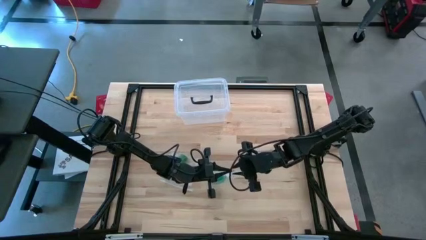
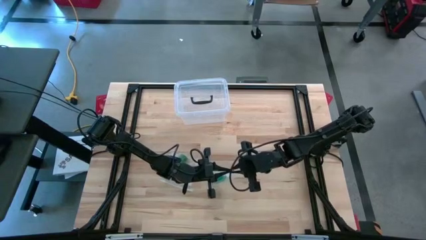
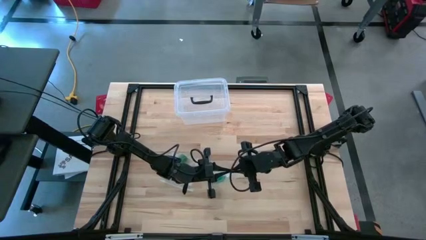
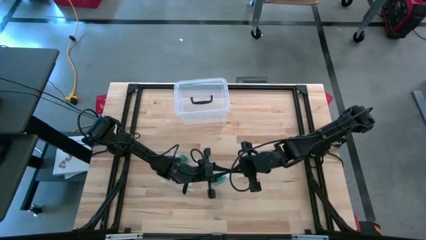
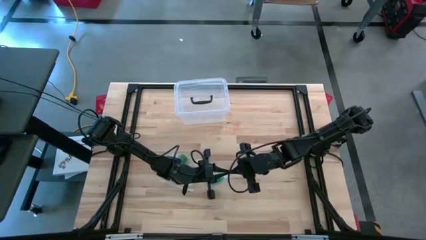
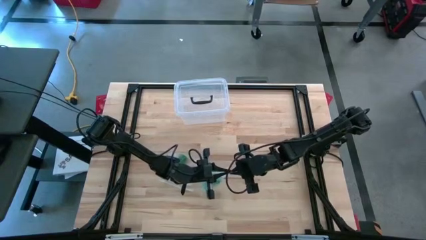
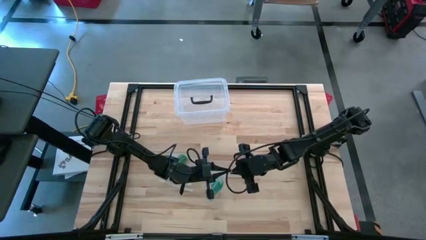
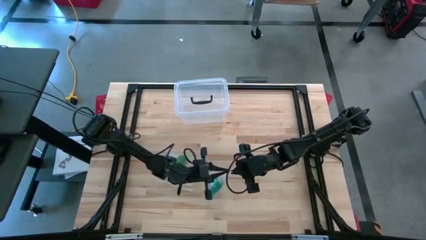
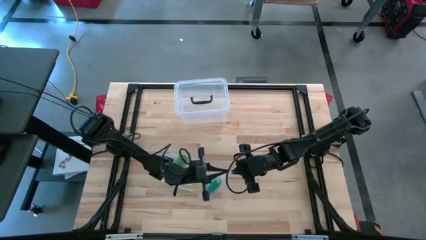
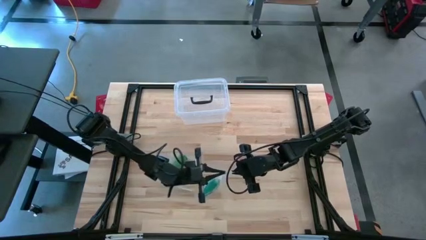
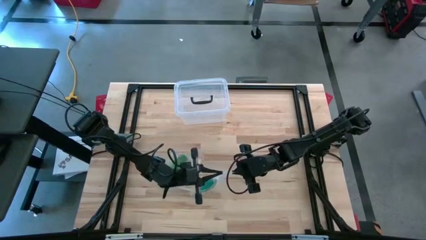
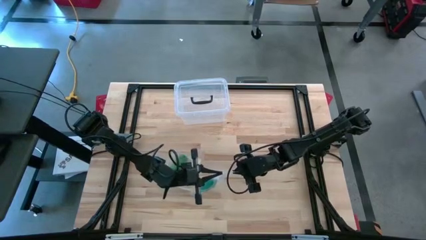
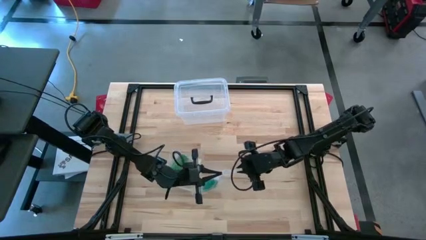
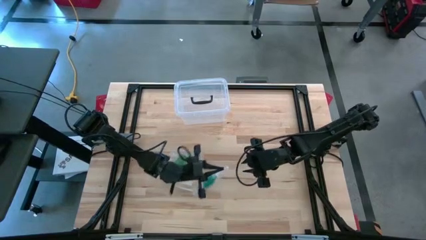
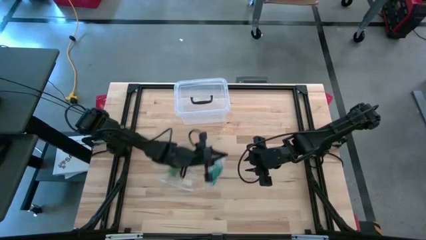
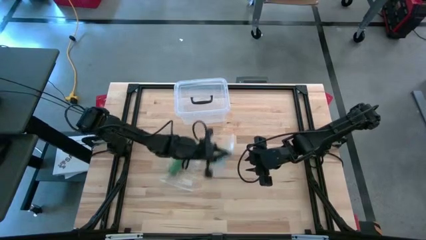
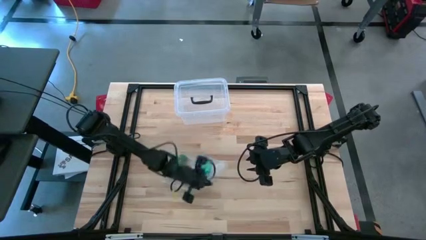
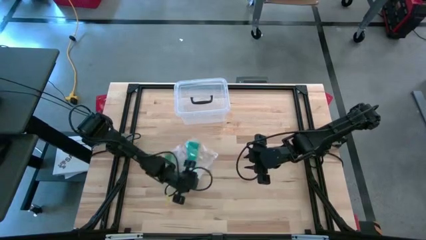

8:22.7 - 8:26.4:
Task: Roll bandage
Close the zip bag

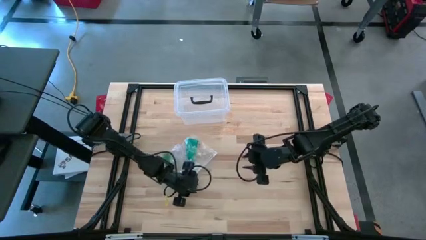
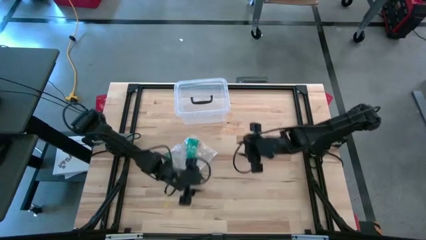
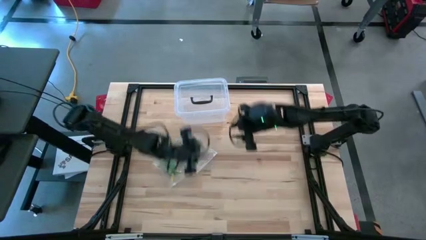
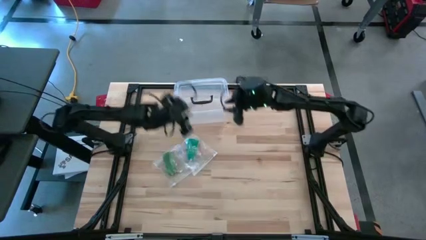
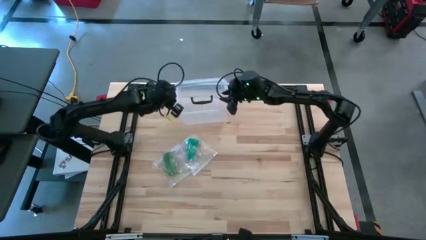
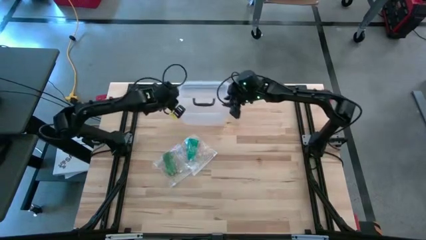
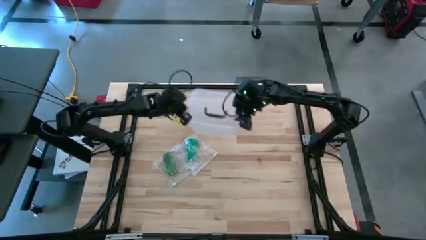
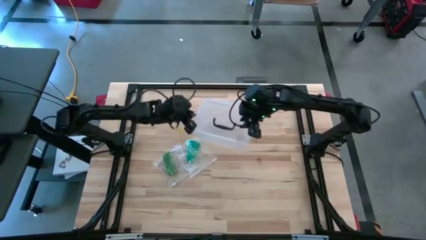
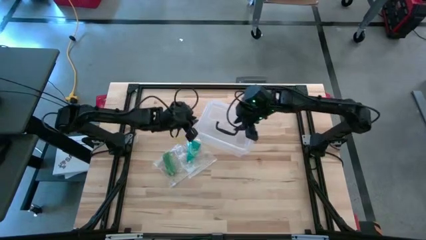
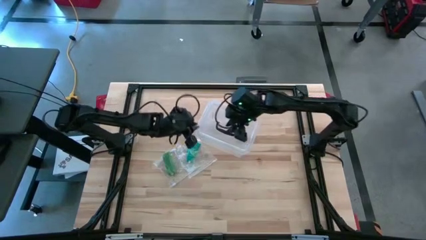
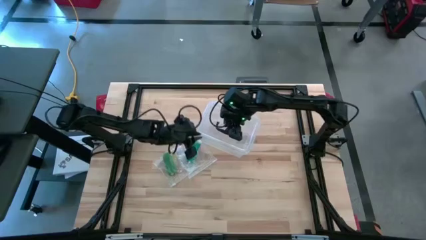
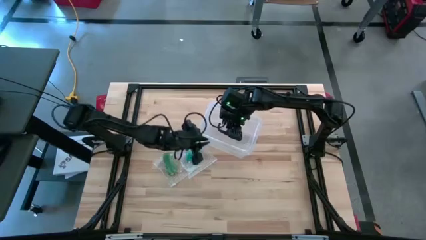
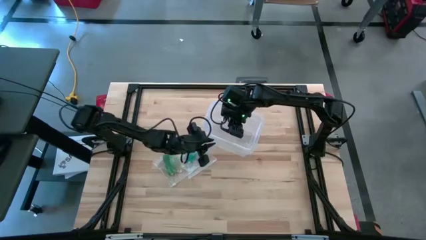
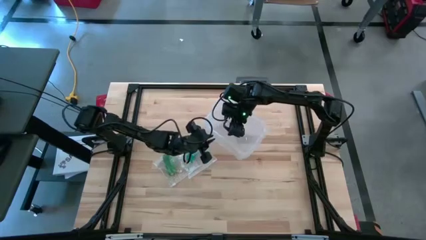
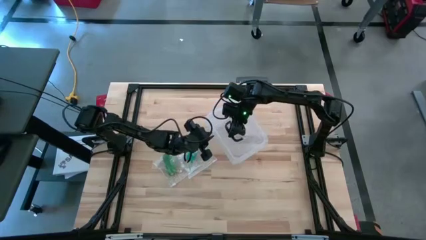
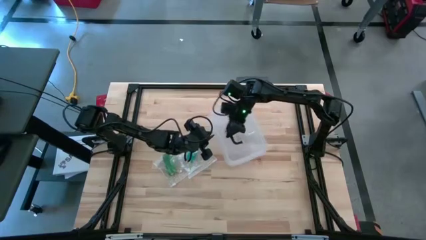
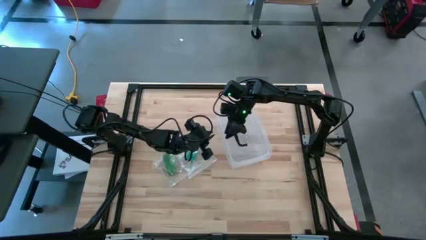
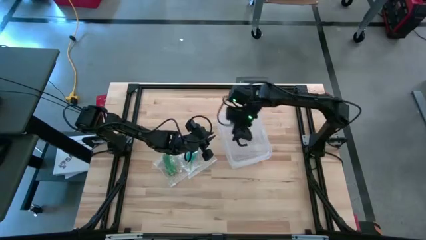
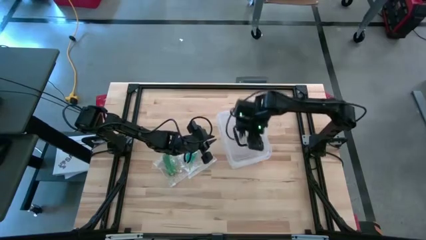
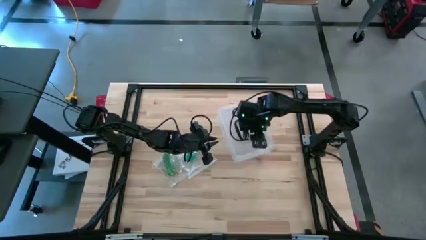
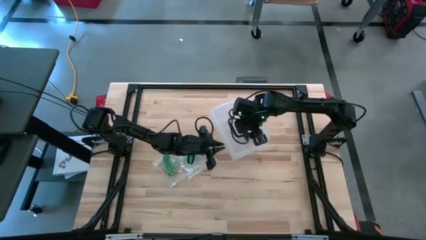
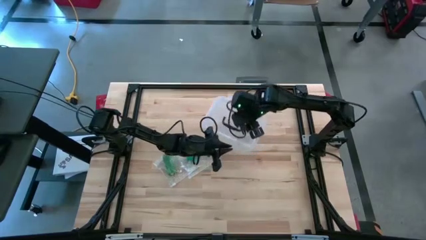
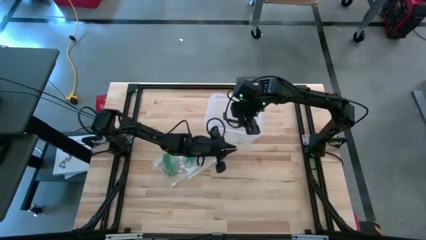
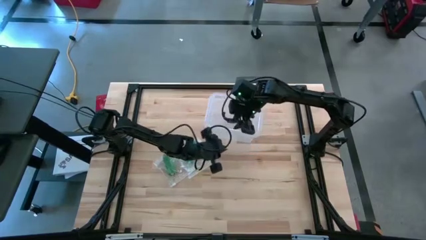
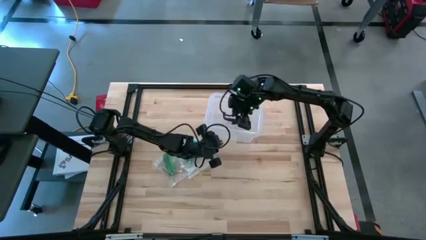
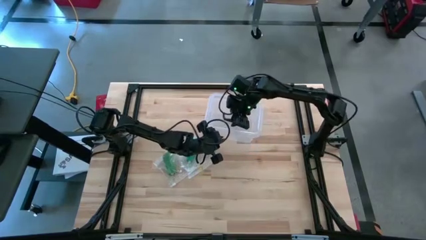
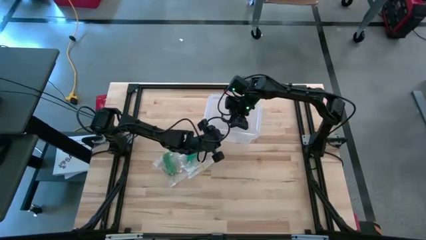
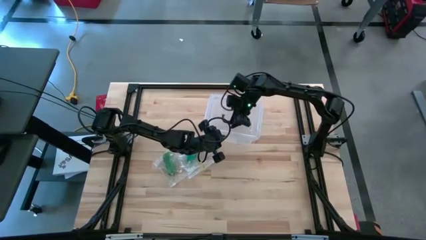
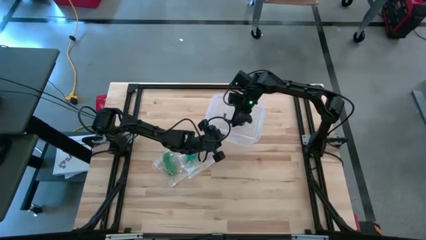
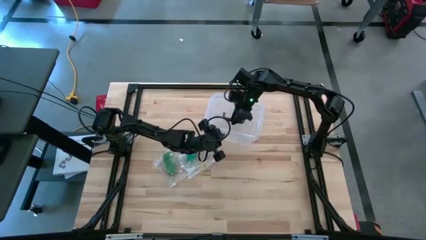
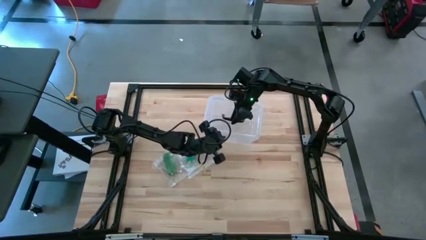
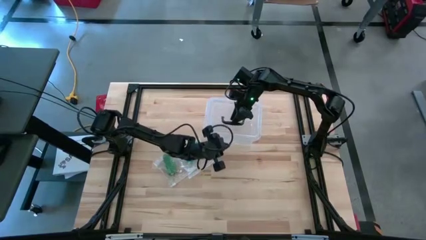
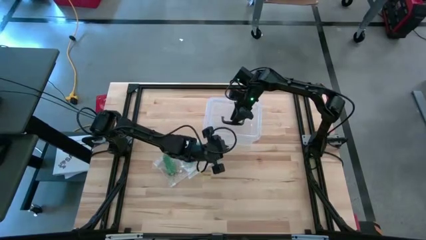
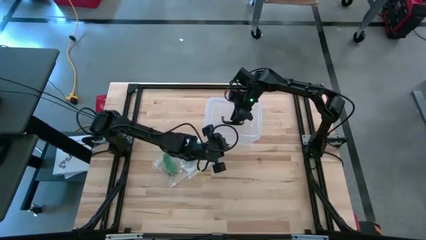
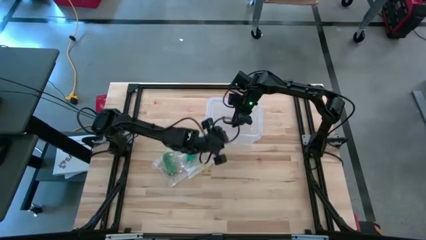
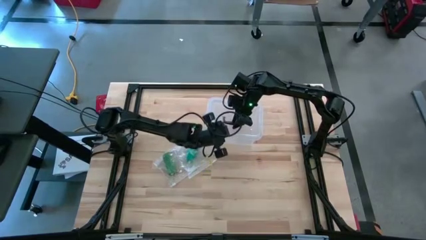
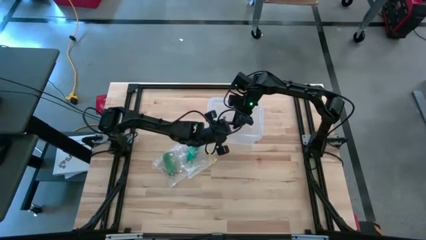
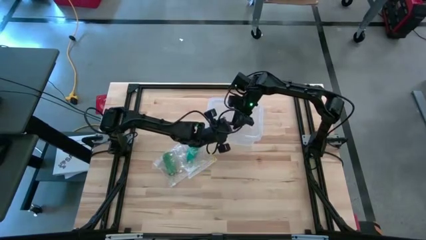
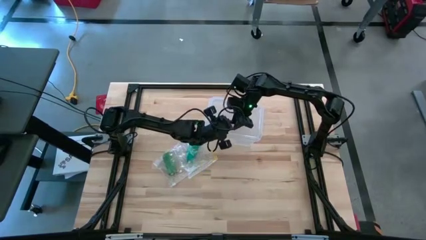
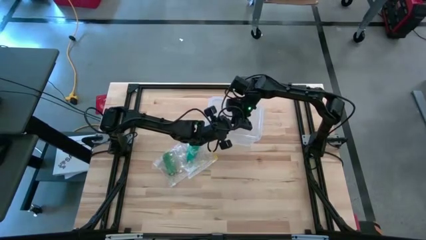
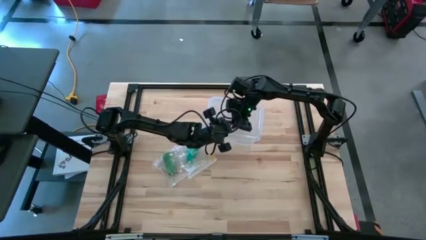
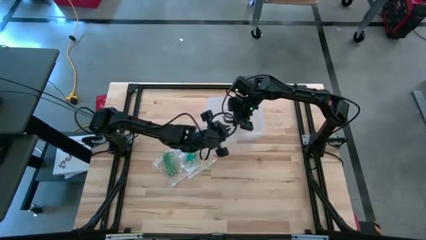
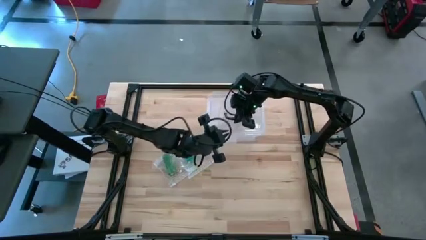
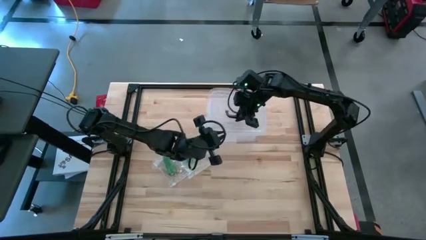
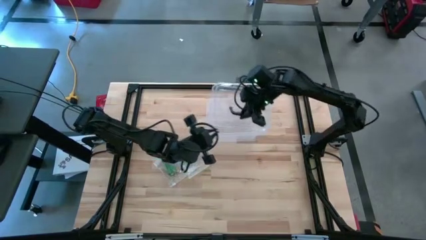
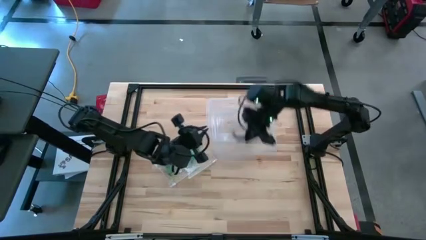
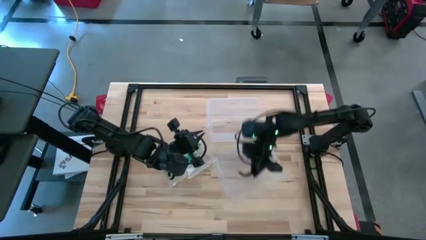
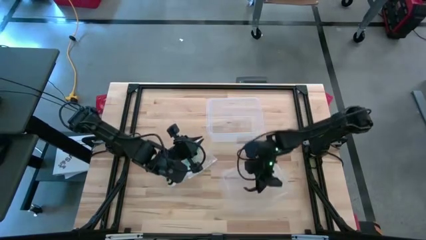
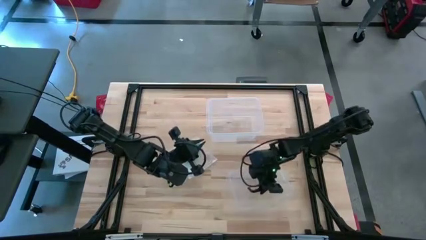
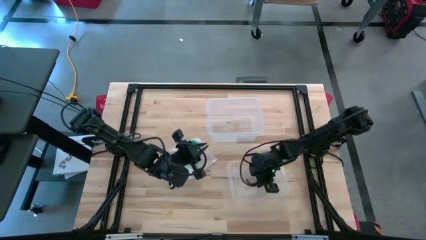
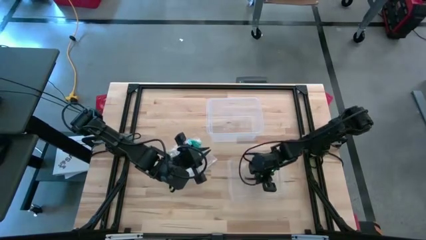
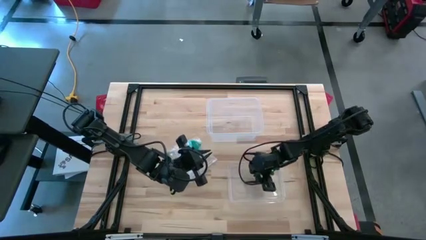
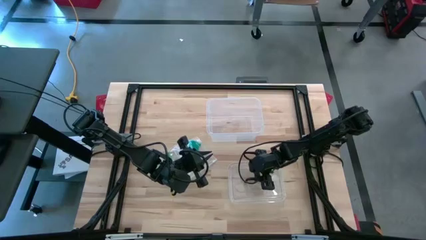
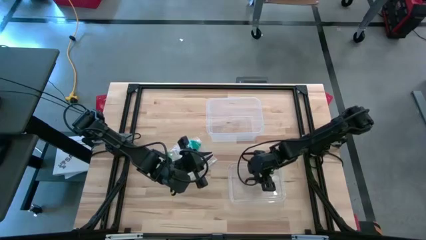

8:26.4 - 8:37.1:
Open the transparent bin

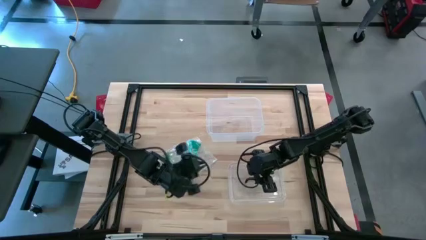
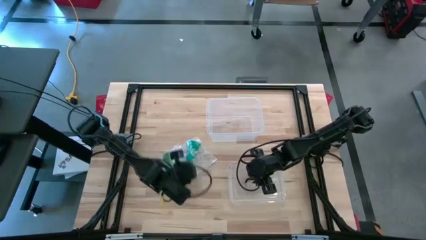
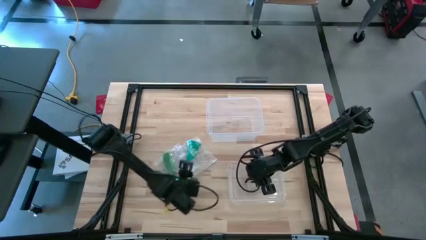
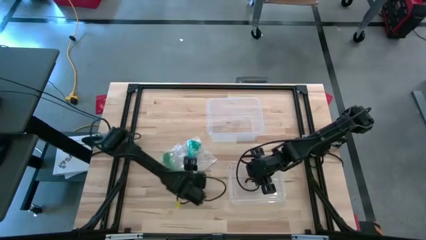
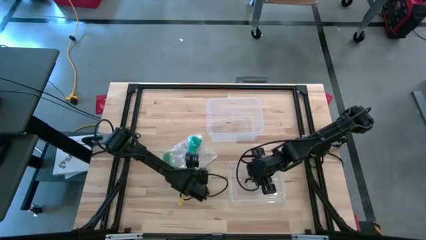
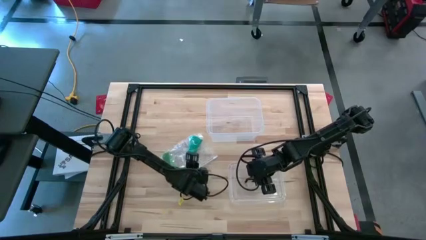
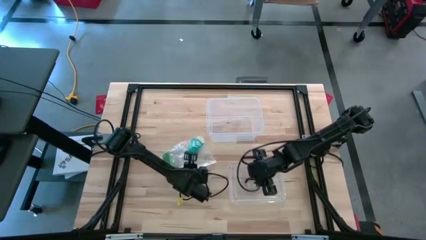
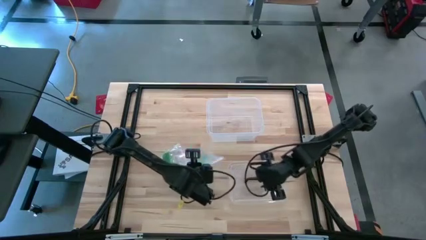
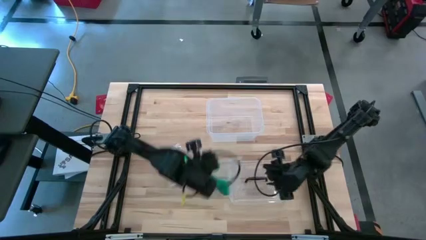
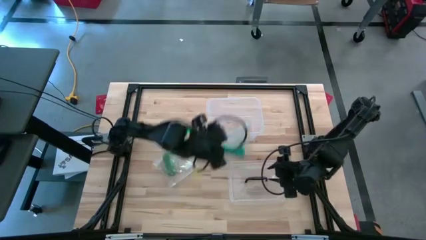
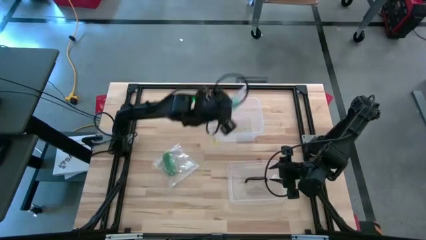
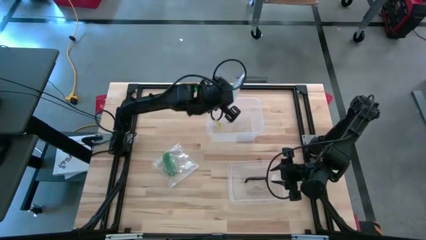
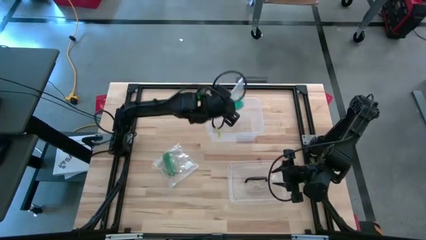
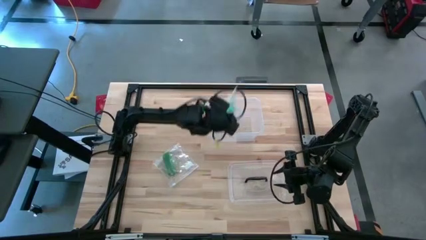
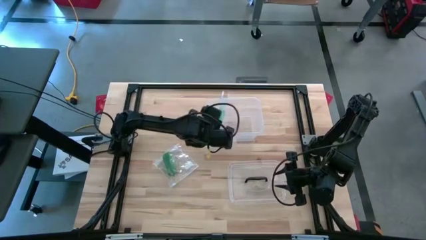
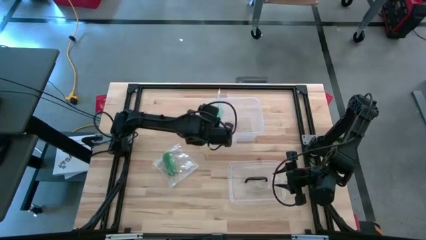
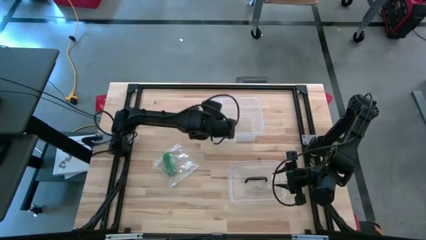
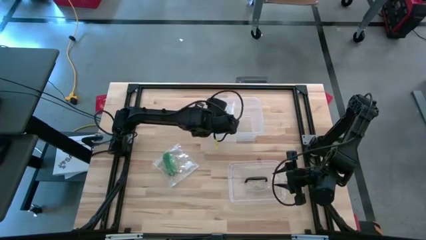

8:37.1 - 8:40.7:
Put the packaged dark green bandage into the transparent bin
